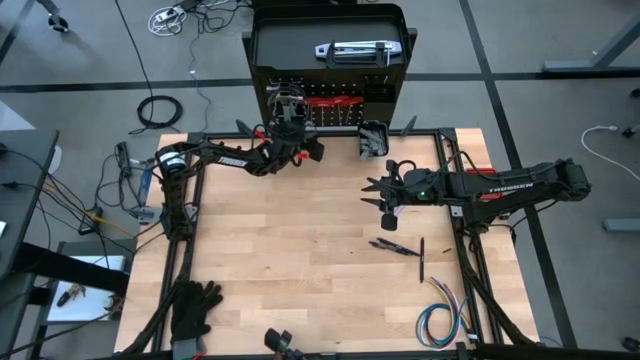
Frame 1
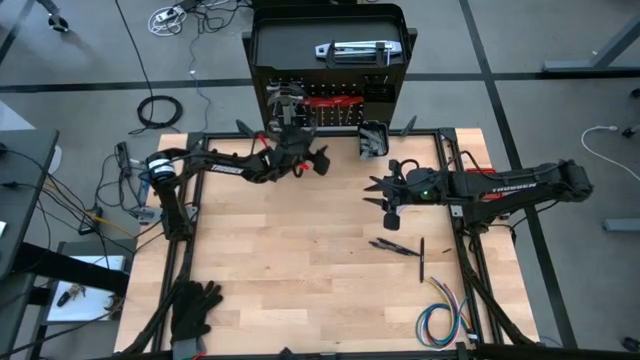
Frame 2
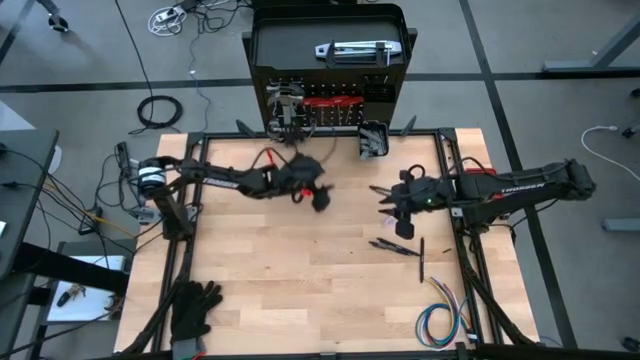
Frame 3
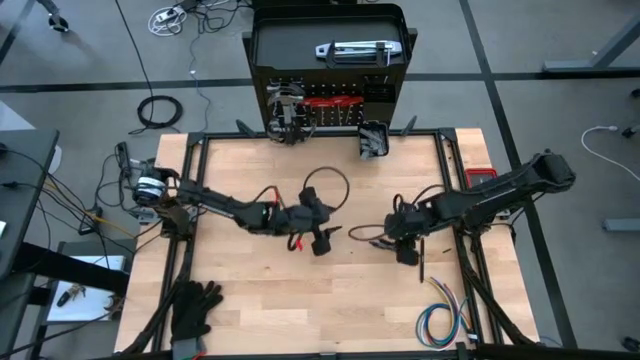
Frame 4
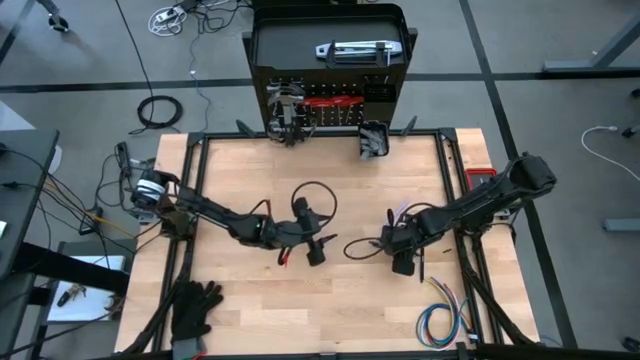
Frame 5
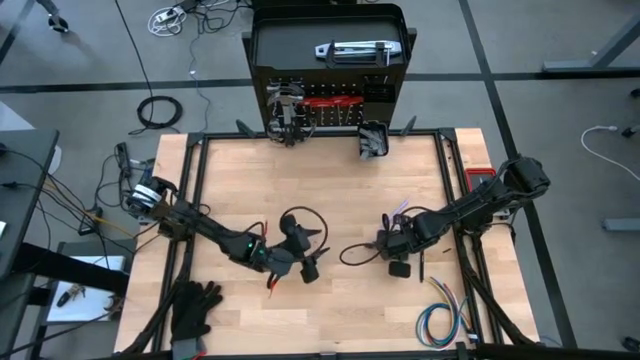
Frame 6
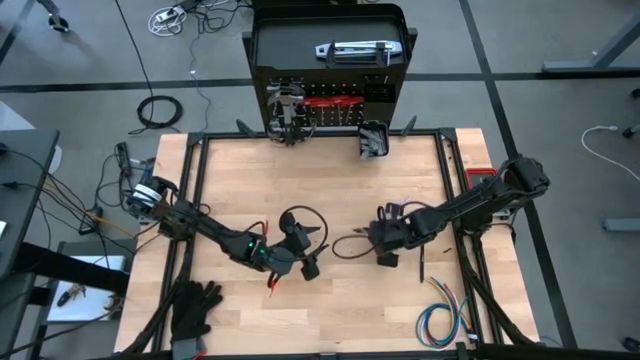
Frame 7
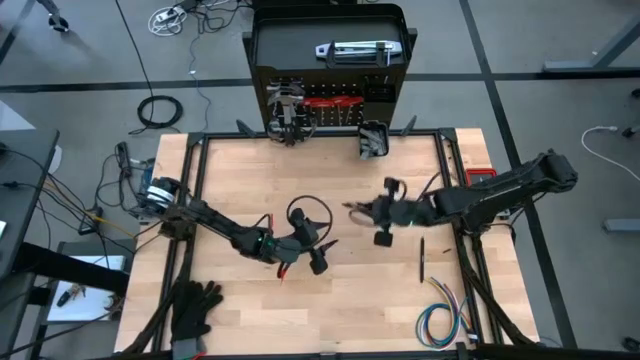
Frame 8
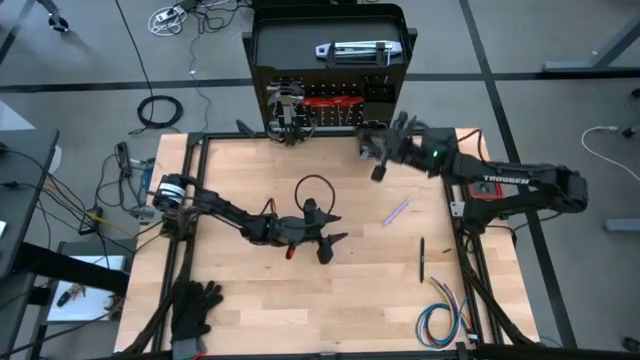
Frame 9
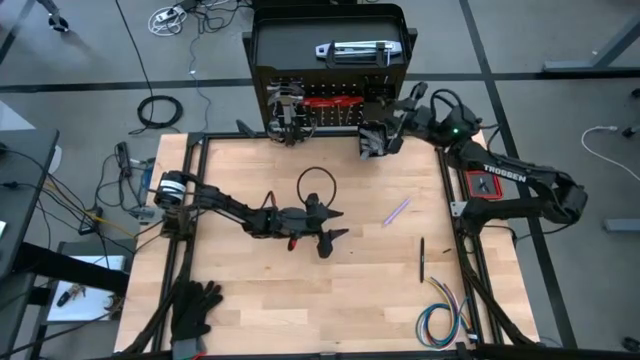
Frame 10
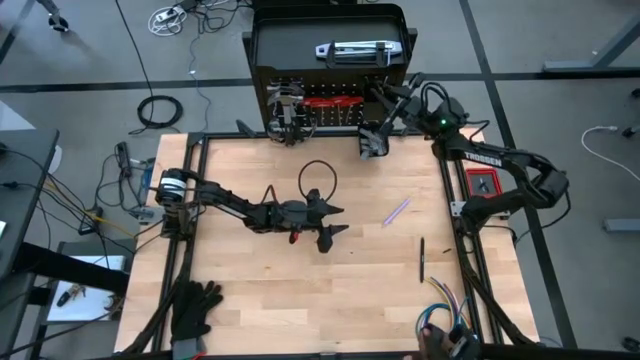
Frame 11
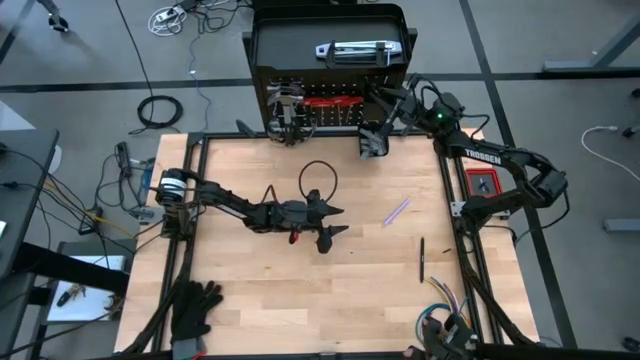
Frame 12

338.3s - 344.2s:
Task: Hang tools onto peg board
Put the left black pen on the pegboard

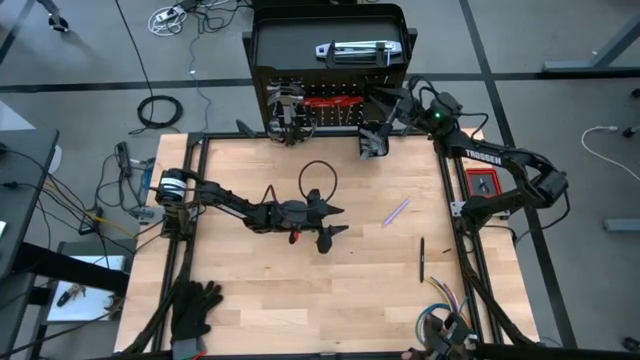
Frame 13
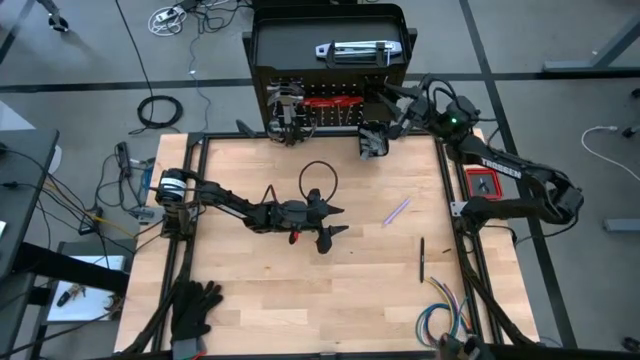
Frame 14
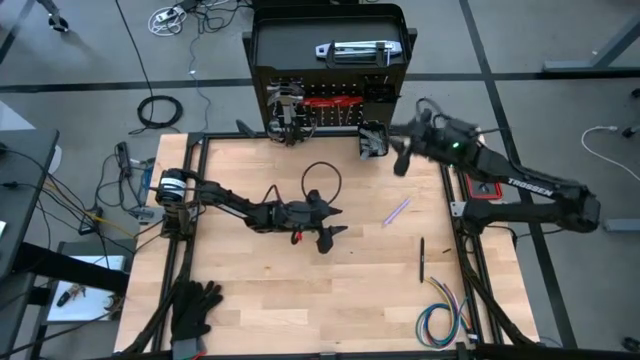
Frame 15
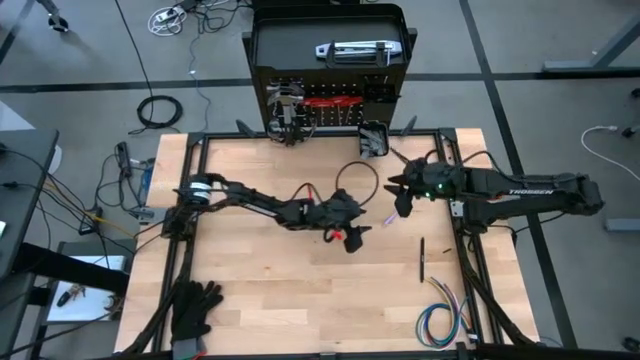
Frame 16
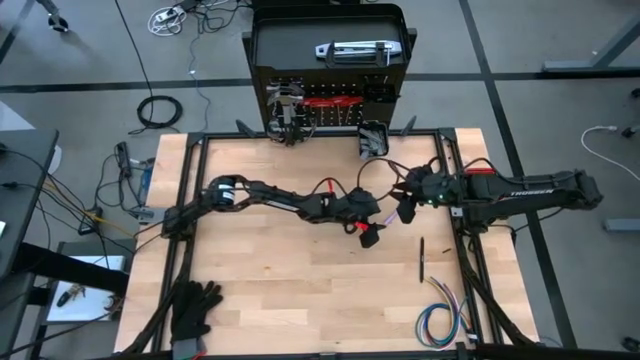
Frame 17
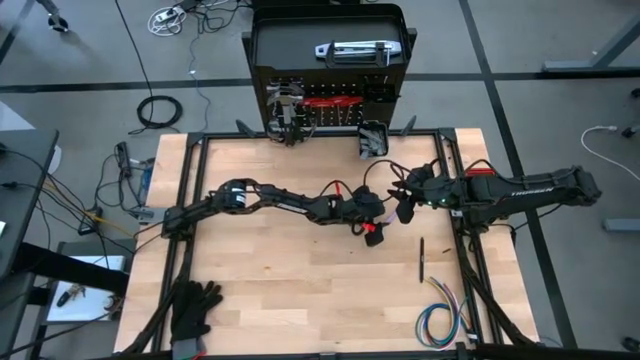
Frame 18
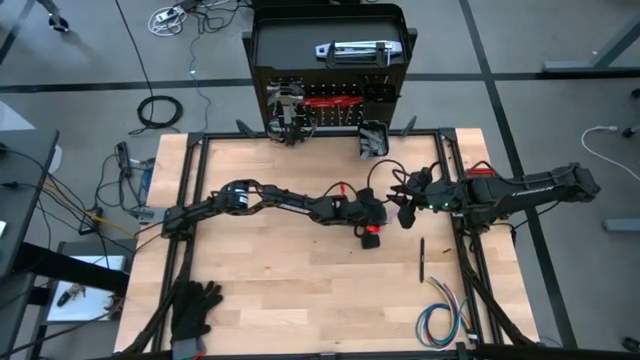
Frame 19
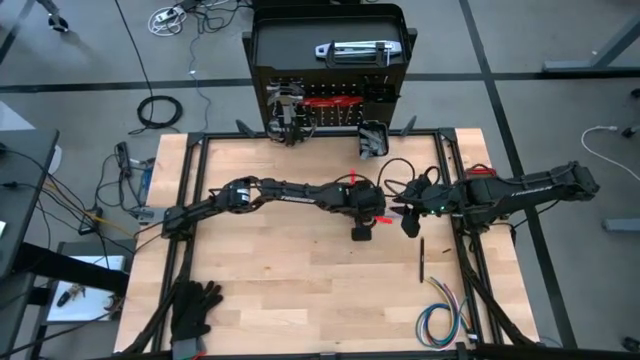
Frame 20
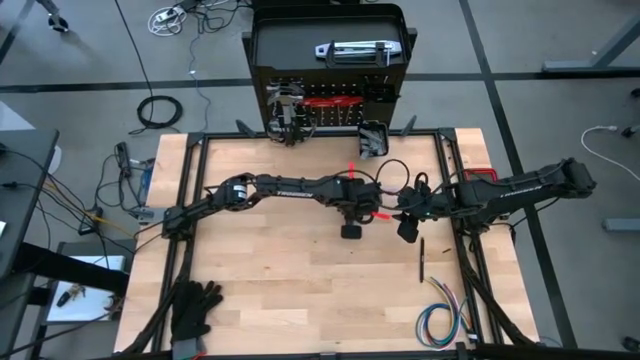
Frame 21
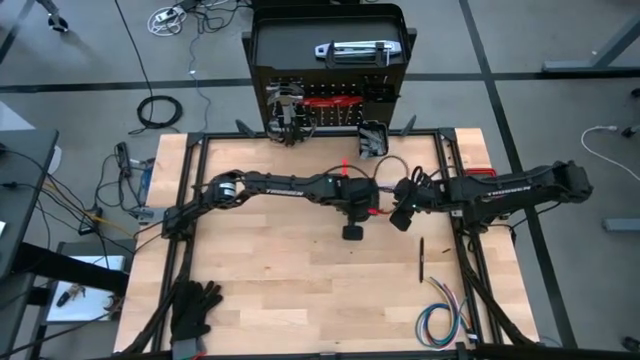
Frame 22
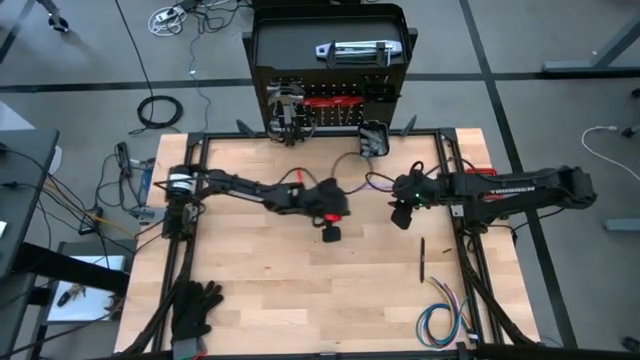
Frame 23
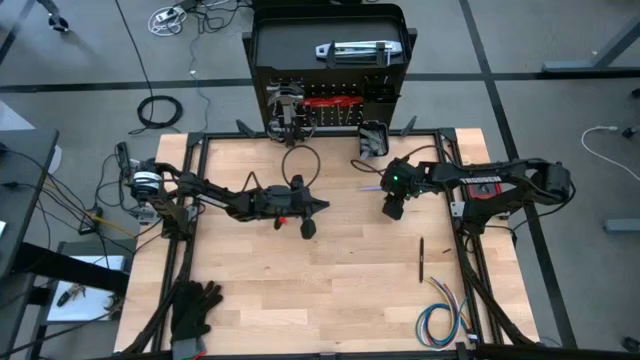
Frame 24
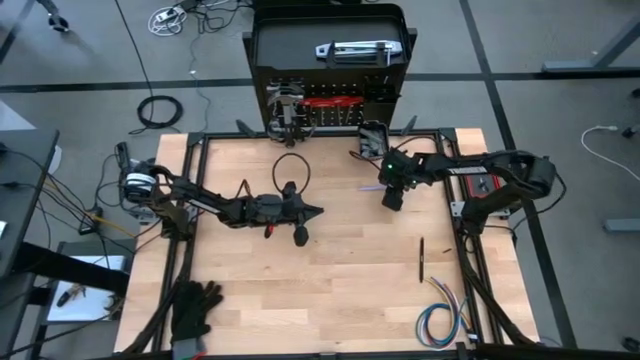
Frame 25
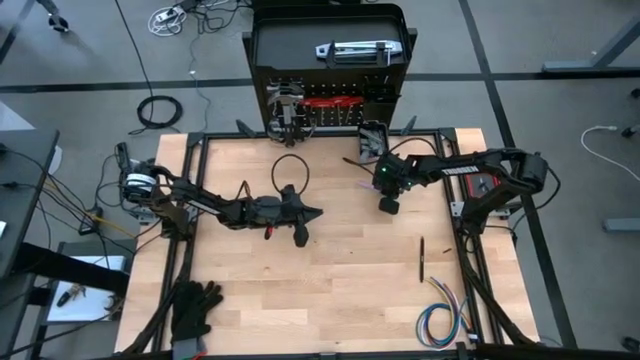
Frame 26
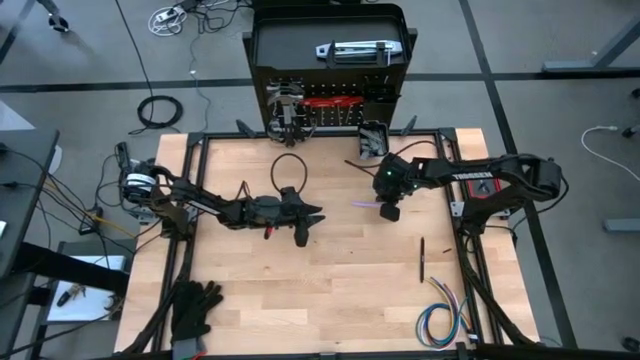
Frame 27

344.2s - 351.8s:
Put the pink pen on the pegboard

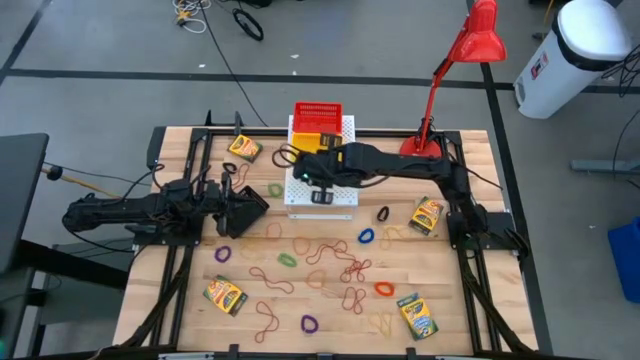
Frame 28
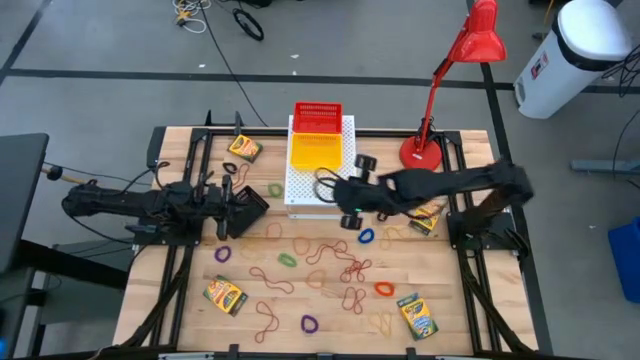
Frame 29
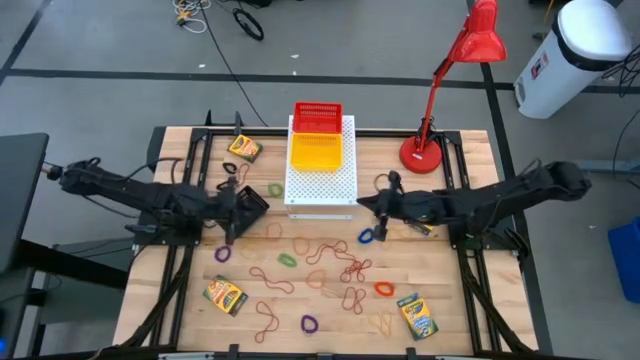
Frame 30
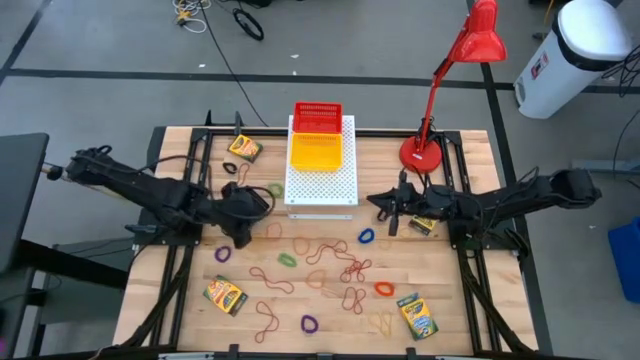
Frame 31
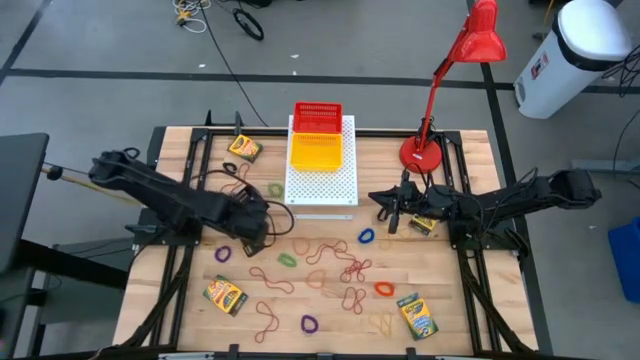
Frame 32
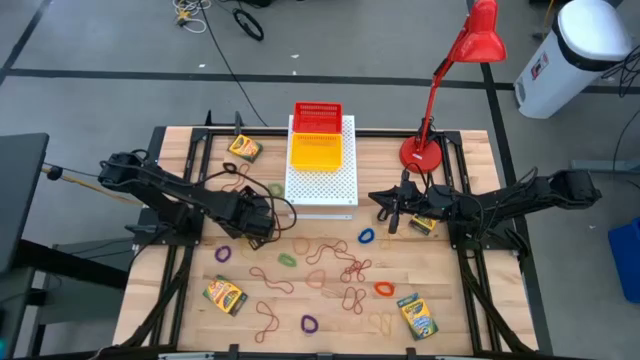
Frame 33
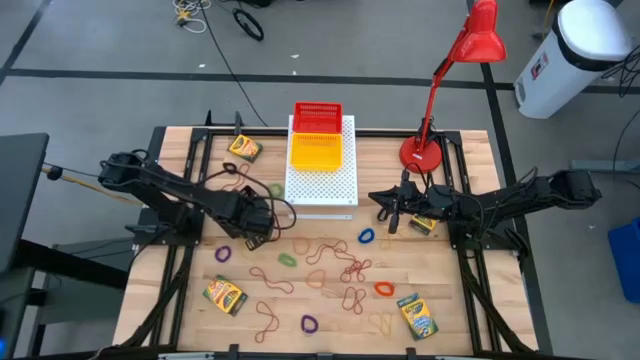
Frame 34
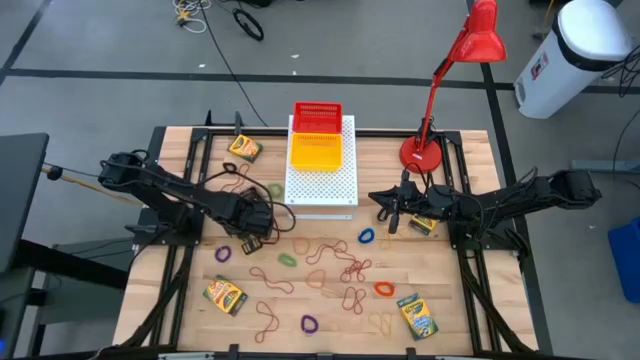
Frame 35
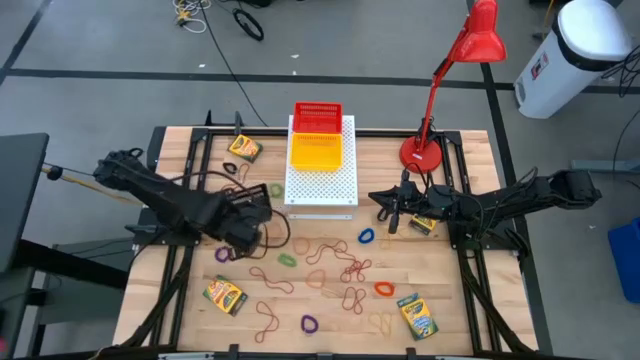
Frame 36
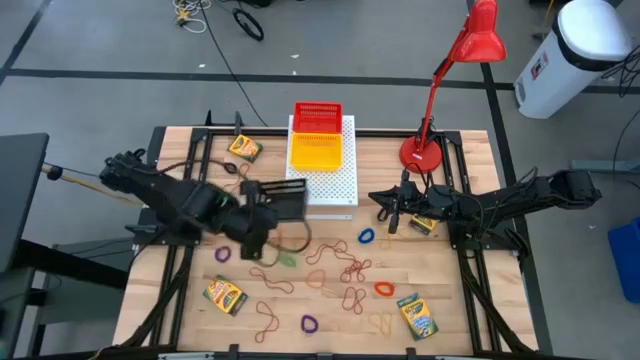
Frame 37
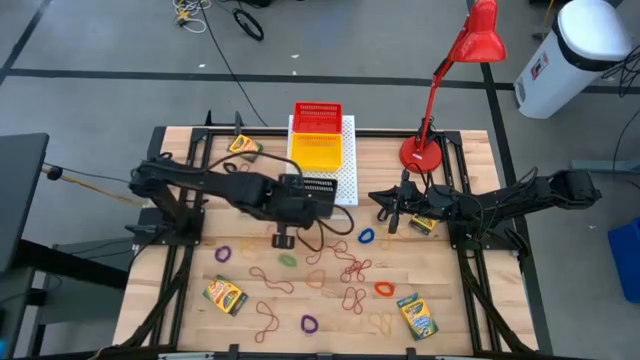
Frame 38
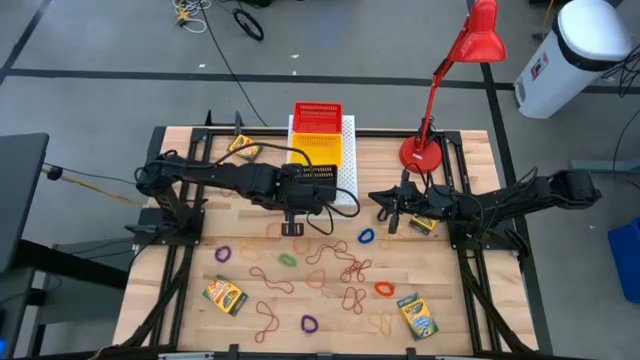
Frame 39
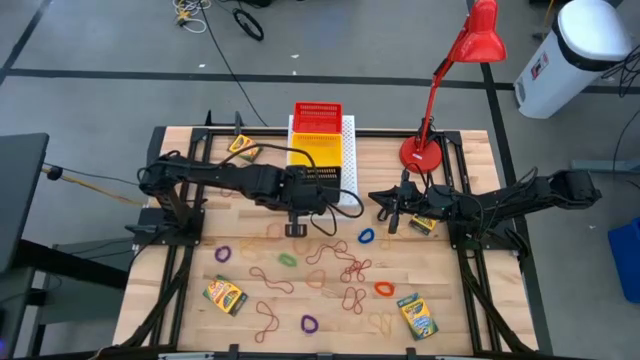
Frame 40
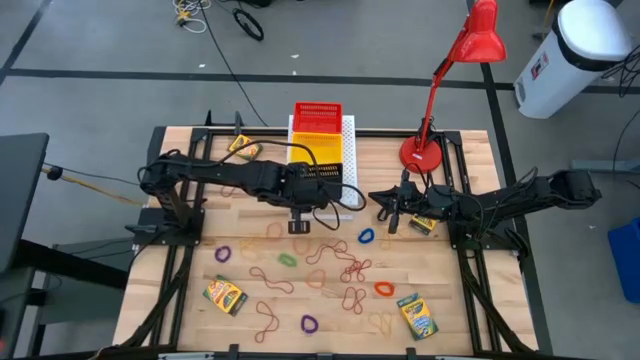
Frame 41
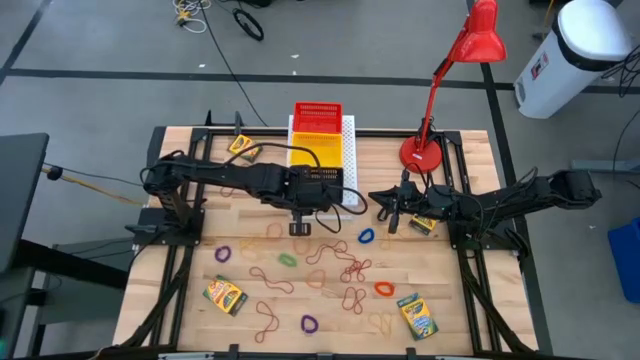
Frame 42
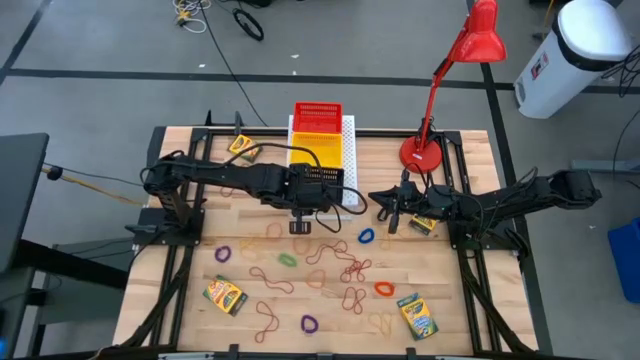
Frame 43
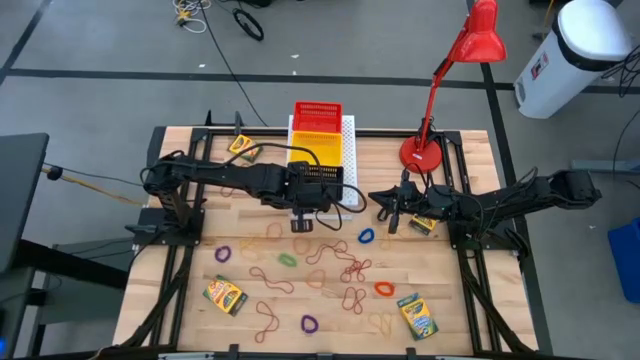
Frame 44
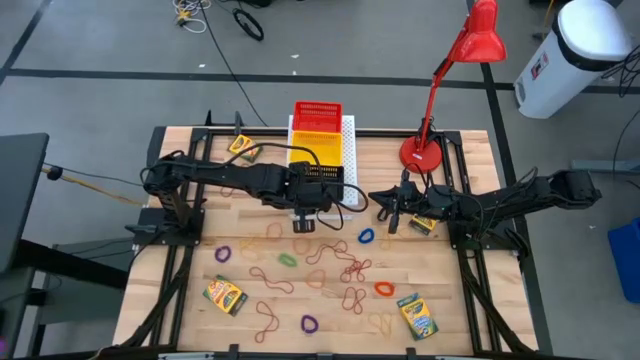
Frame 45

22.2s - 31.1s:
Task: Pick & Place Office Desk Supplies
Put the black bin on the shelf
